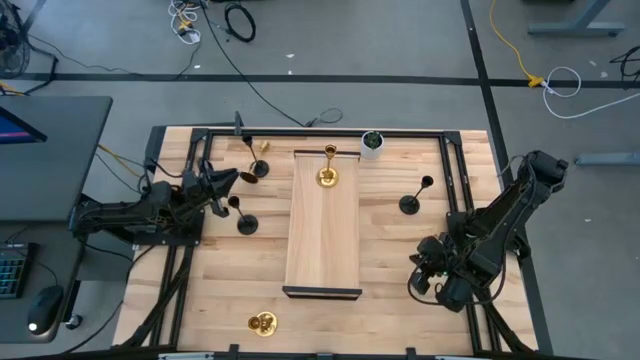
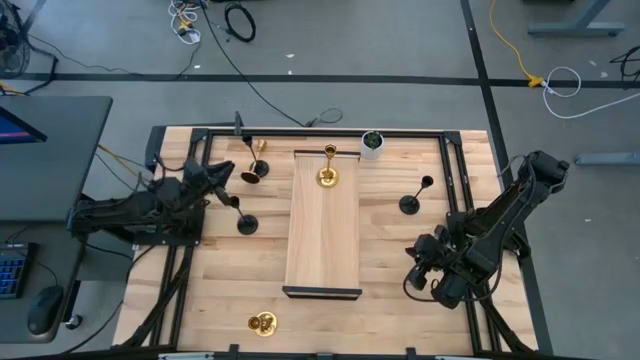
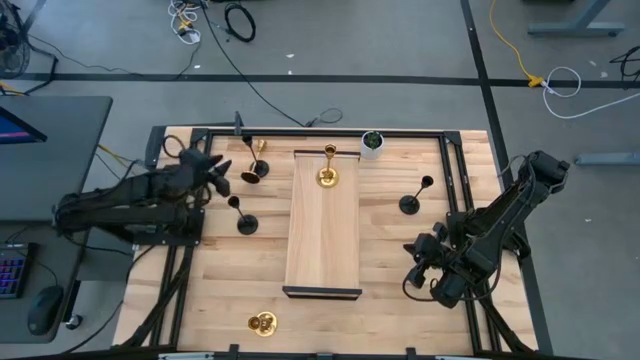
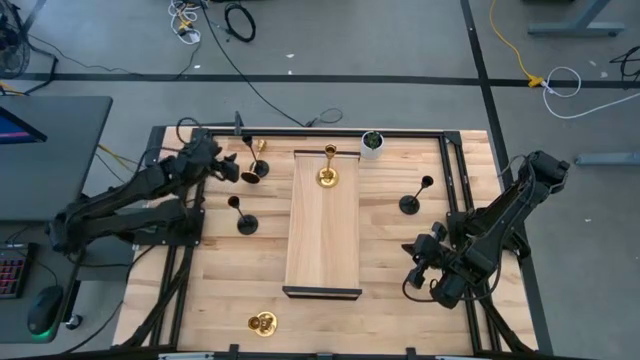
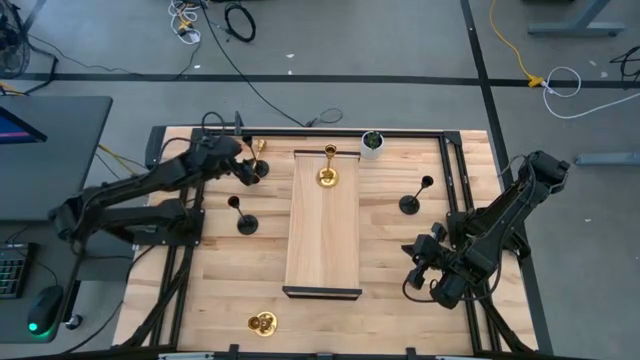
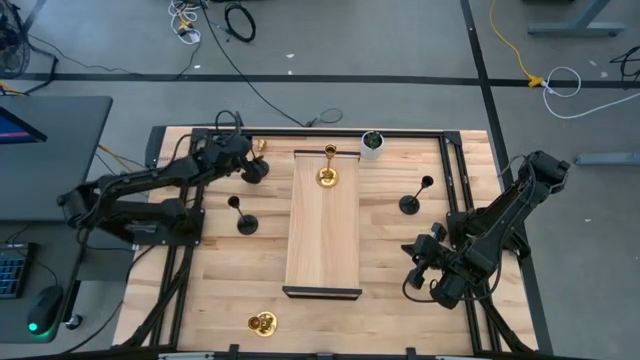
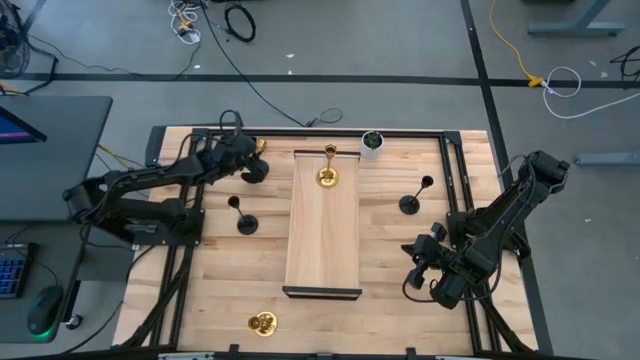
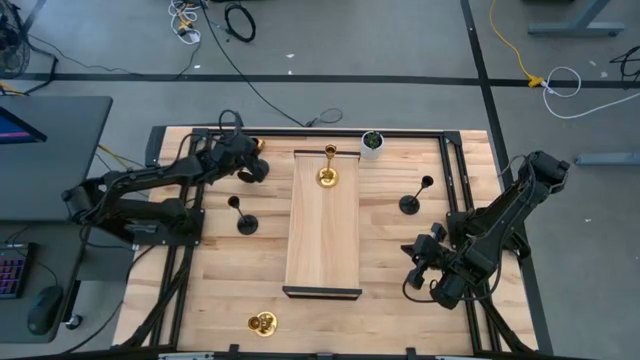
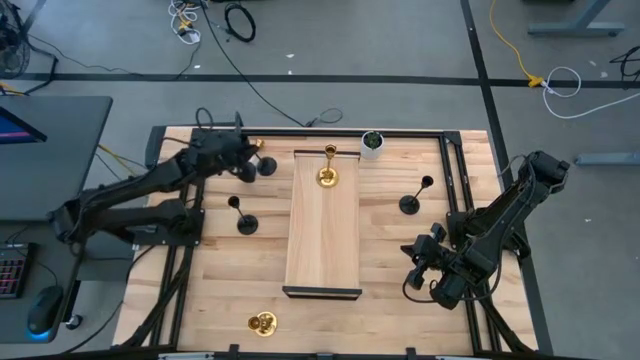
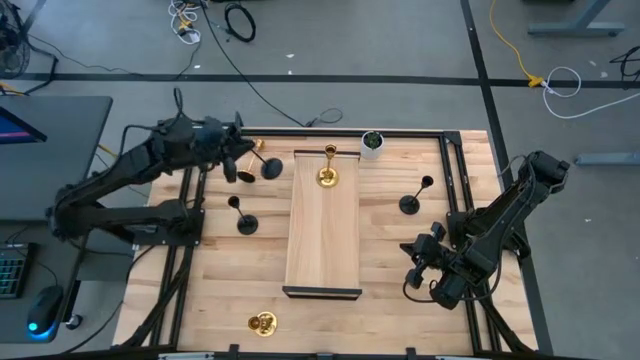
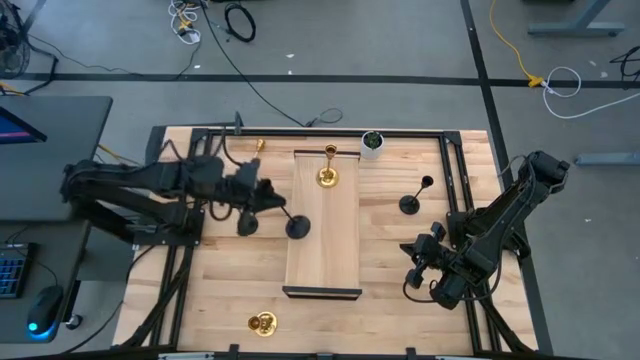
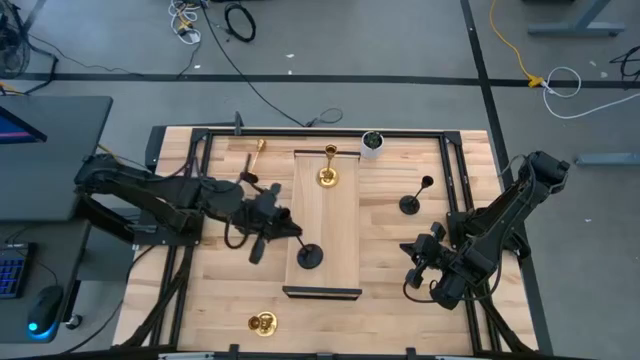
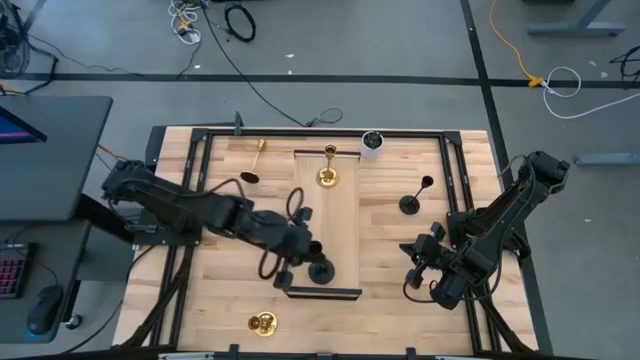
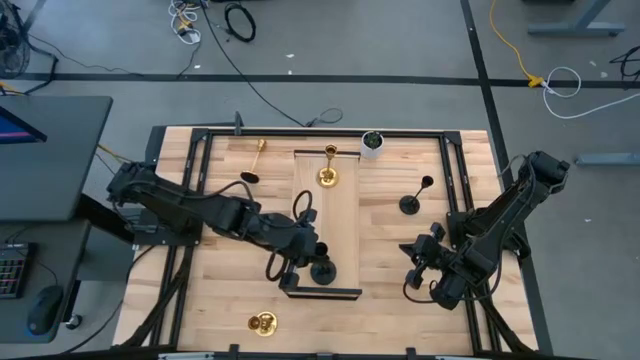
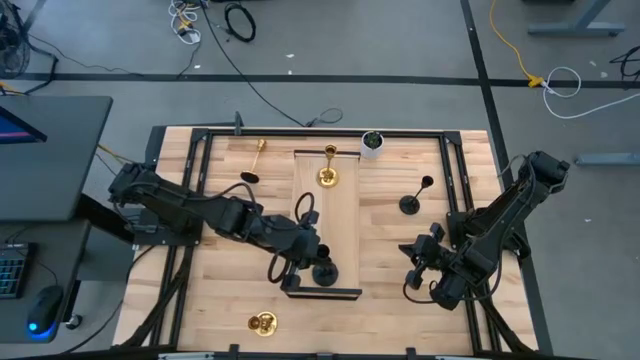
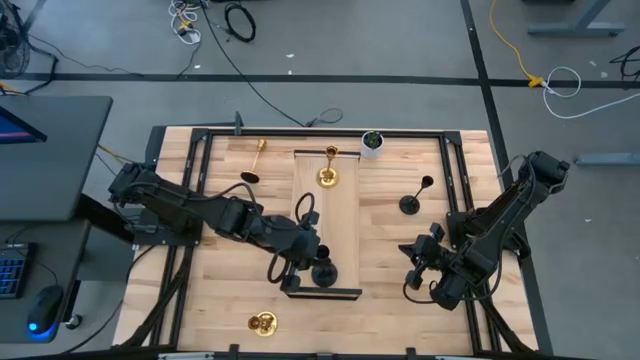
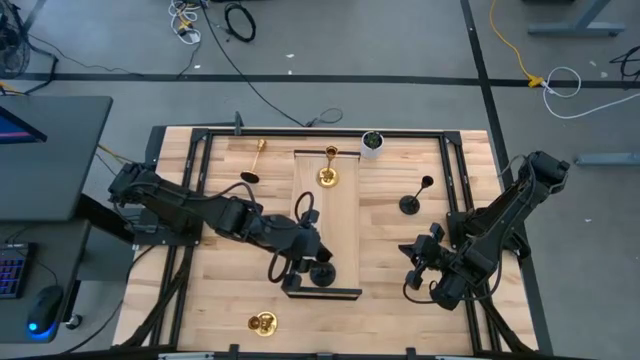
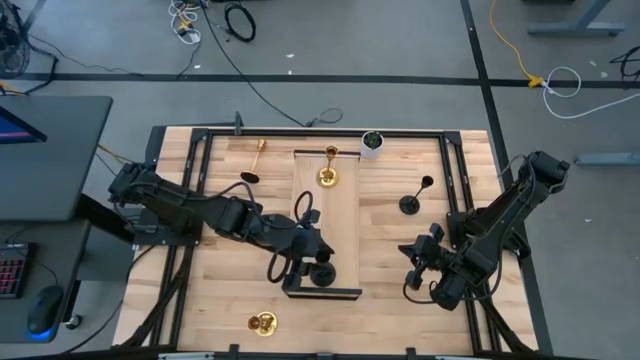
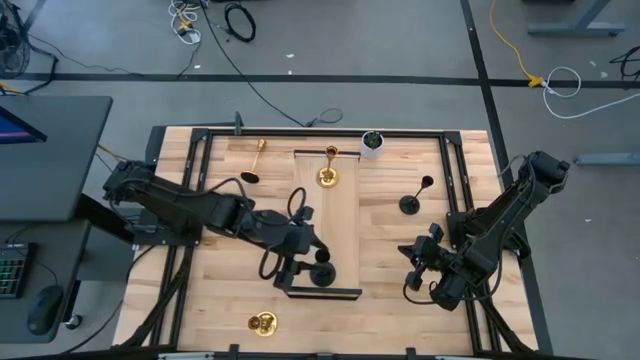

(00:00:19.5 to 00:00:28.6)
Task: Pick & Place candle stick holders
Put the top left black candle holder on the shelf

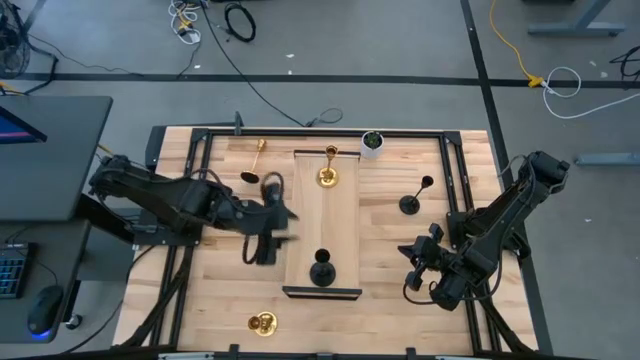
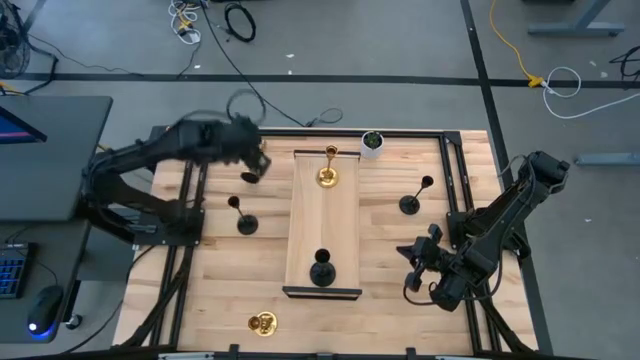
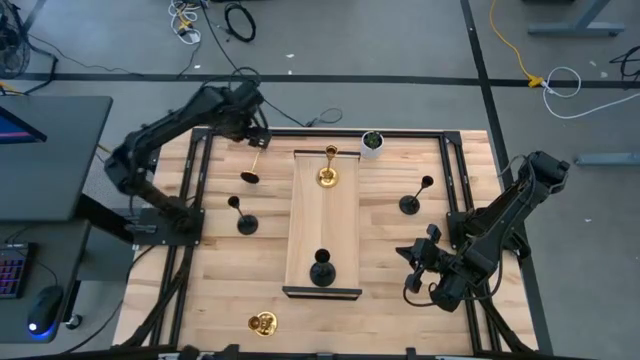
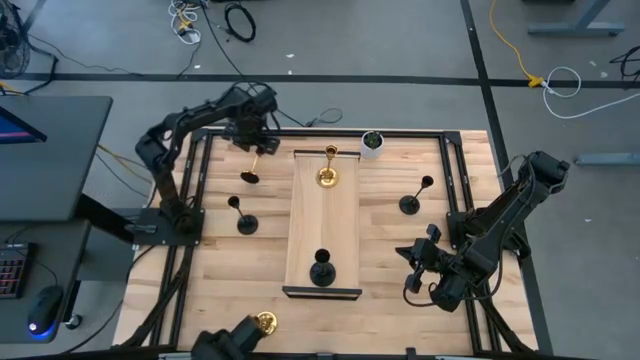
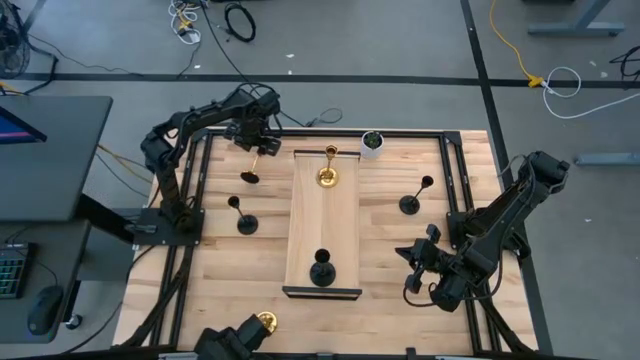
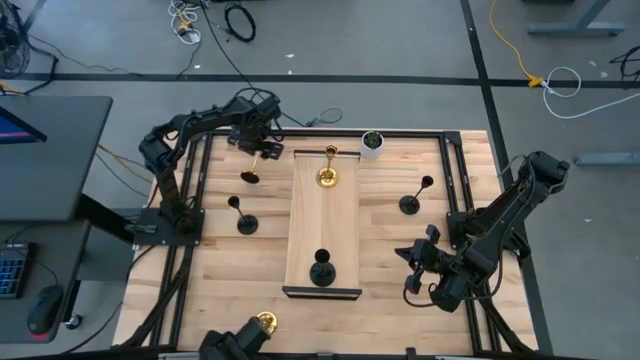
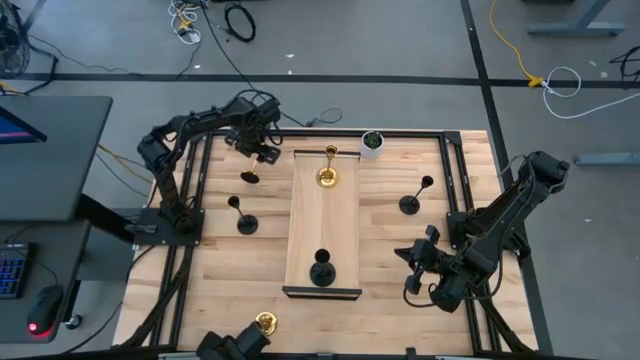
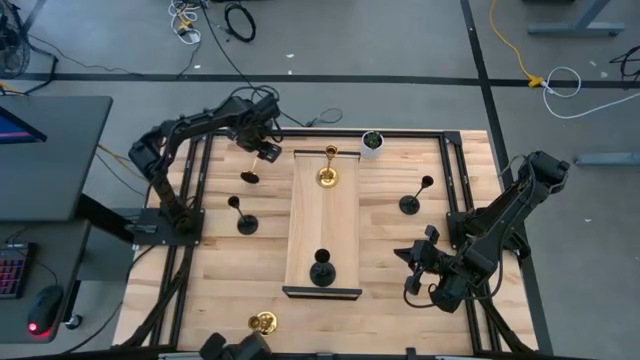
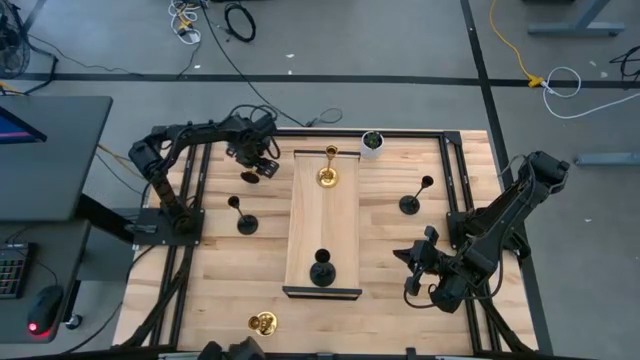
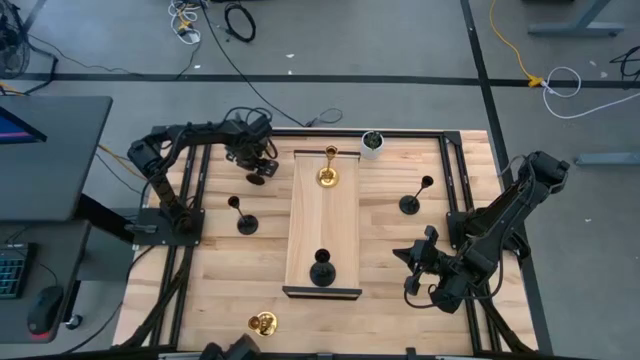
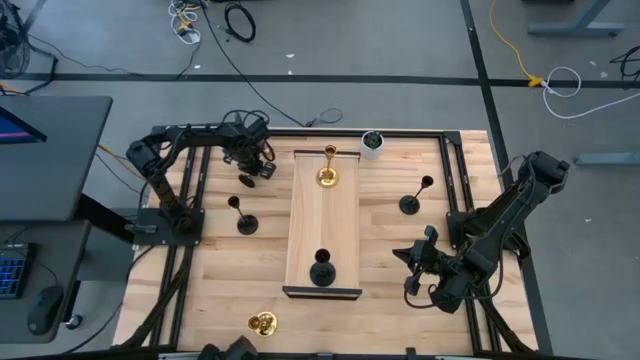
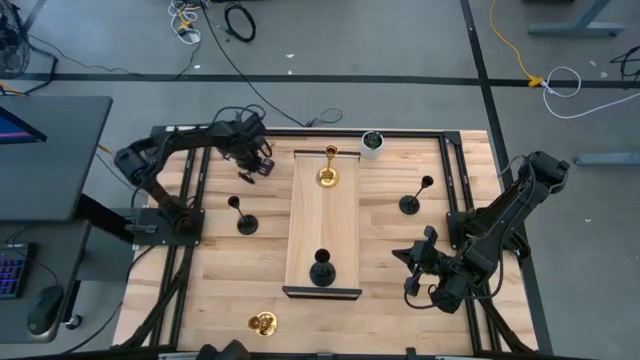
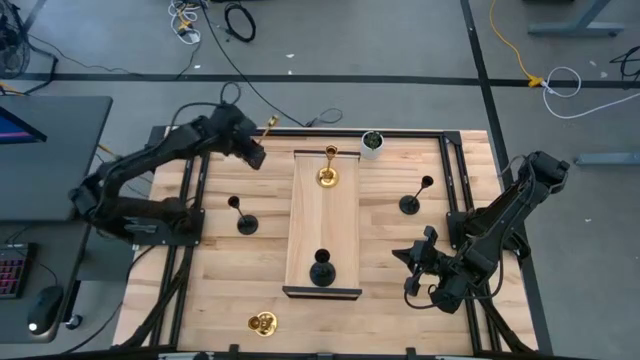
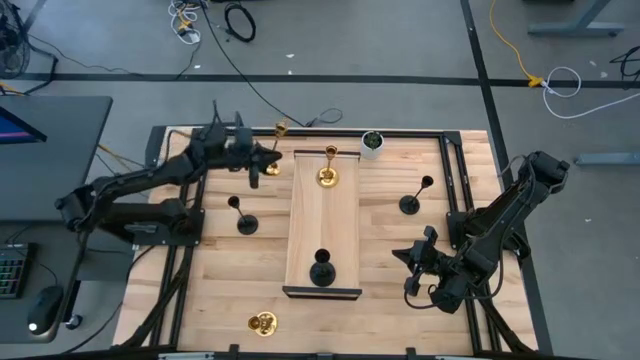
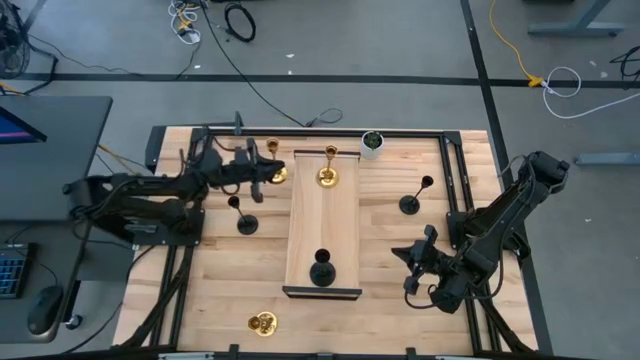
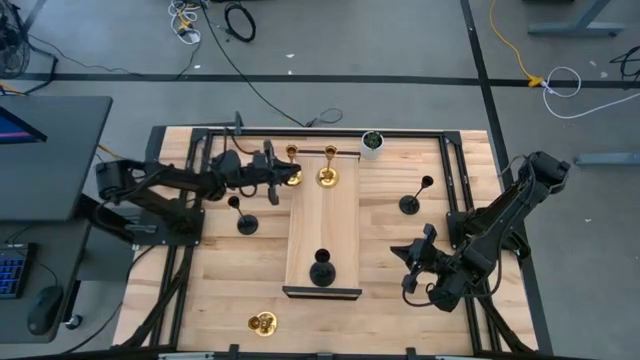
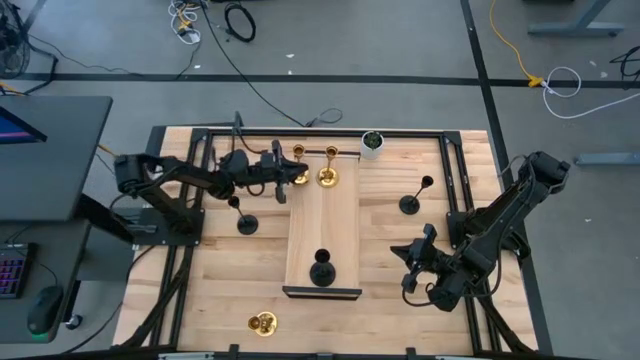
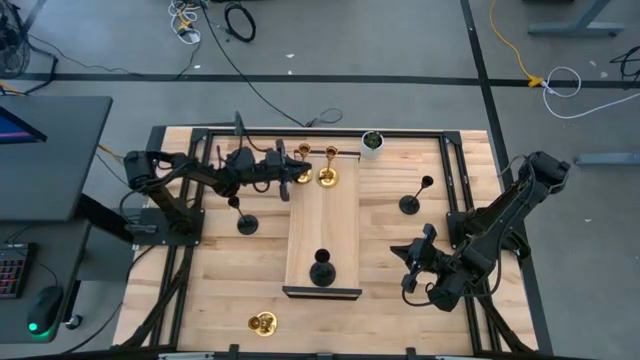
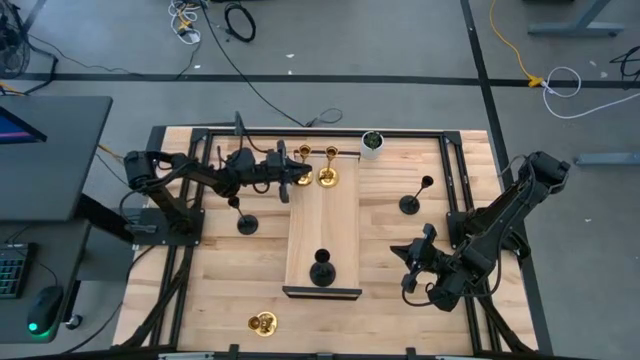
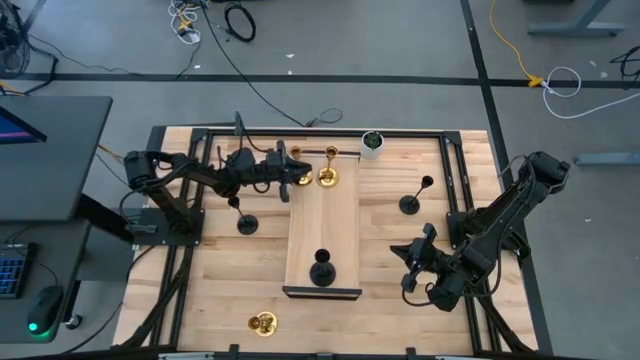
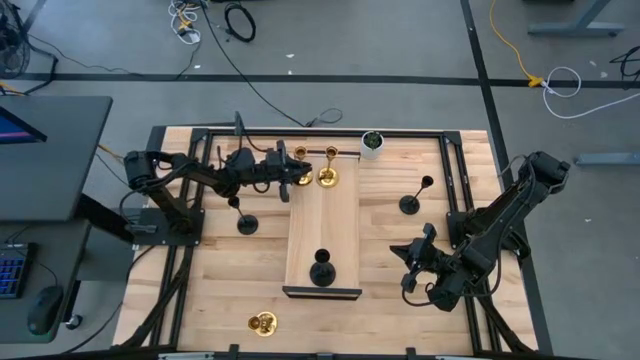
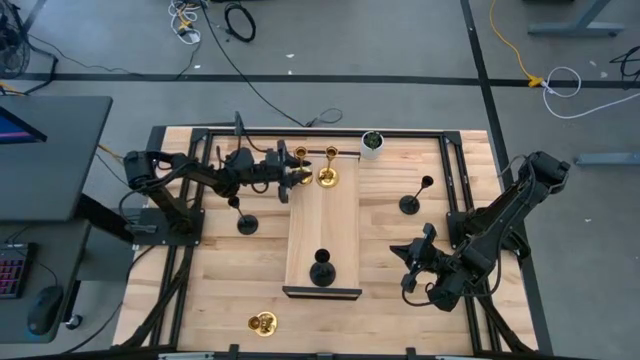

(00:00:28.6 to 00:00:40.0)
Put the top golden candle holder aligned with the golden candle holder on the shelf

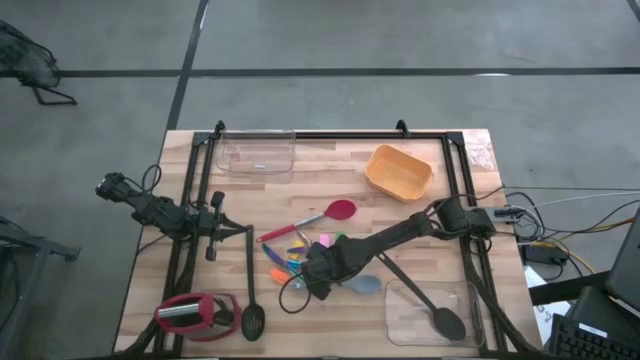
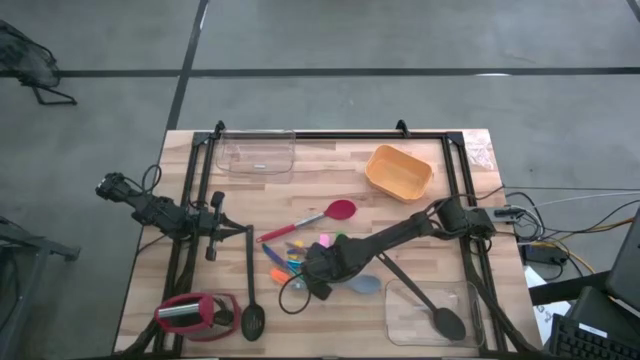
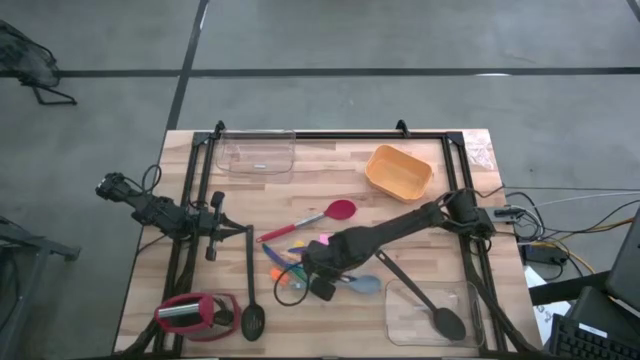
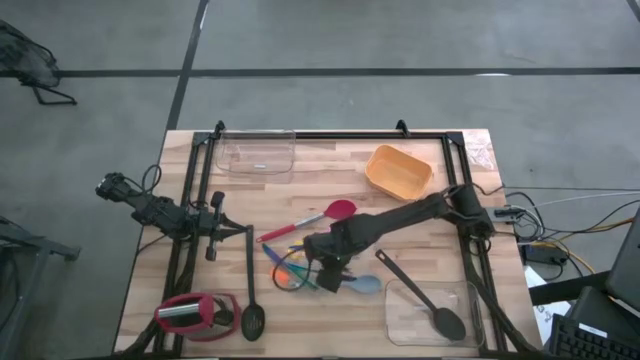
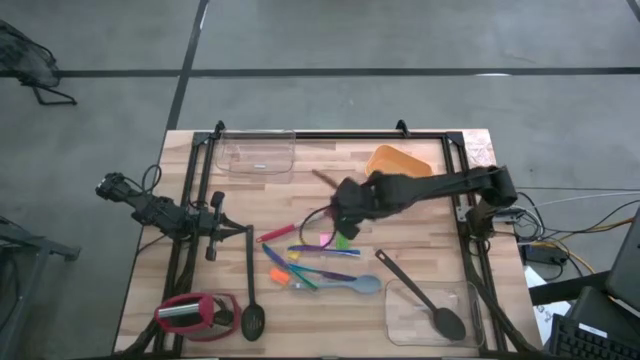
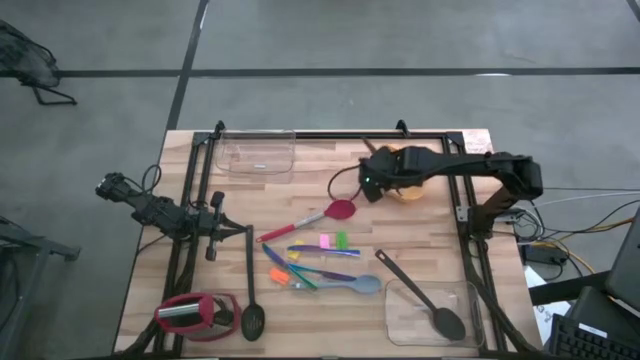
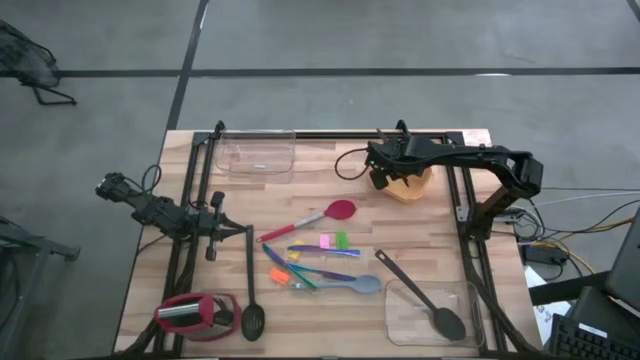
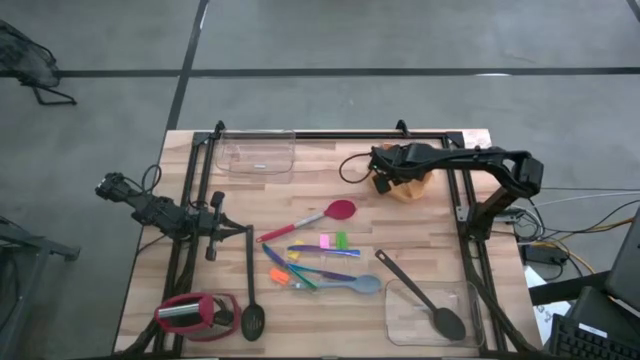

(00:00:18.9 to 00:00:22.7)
Task: Pick & Place Kitchen Items
Put the yellow knife into the yellow bin
